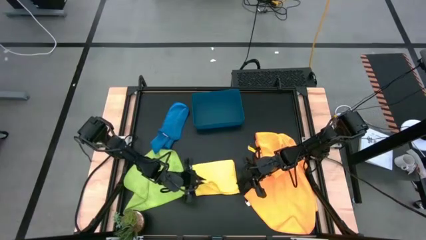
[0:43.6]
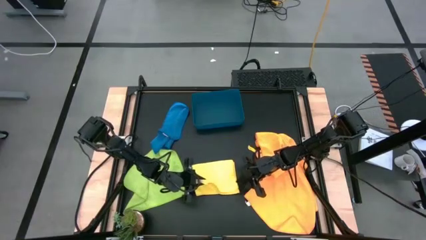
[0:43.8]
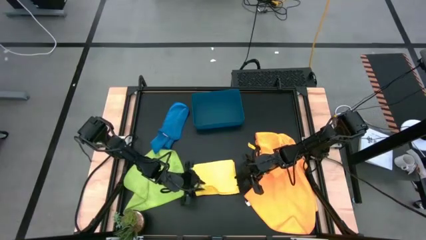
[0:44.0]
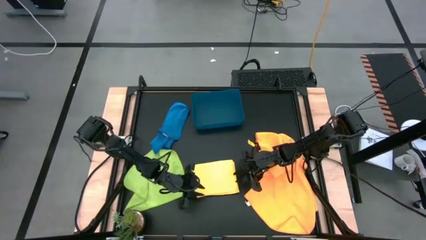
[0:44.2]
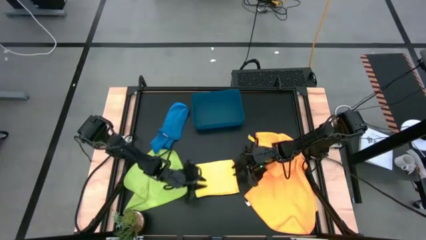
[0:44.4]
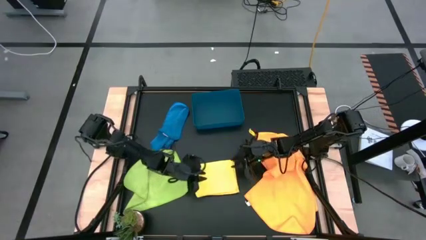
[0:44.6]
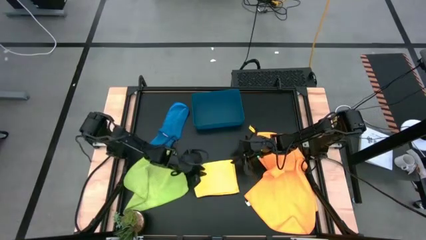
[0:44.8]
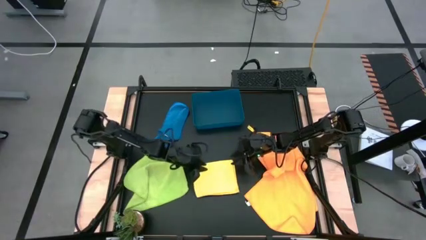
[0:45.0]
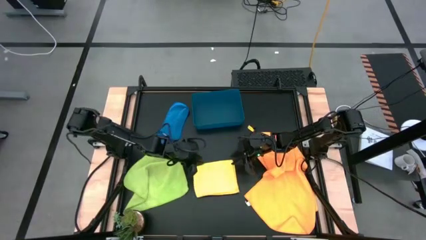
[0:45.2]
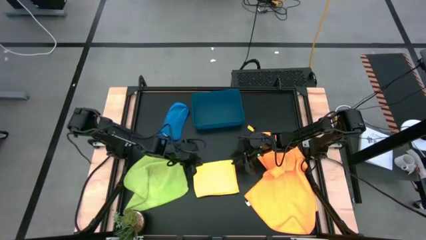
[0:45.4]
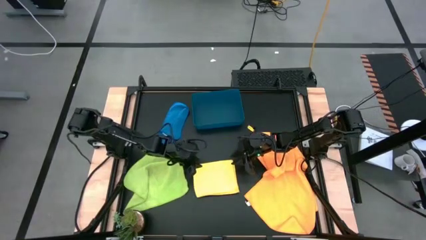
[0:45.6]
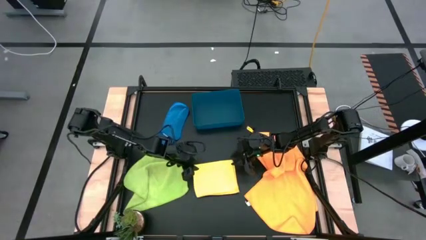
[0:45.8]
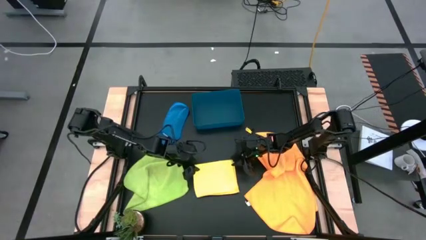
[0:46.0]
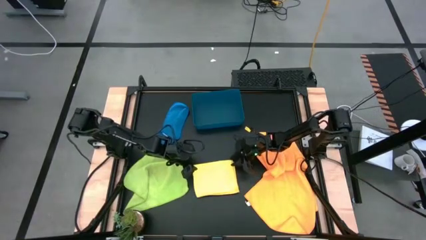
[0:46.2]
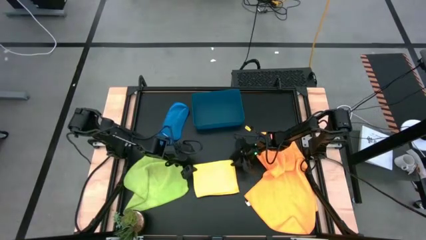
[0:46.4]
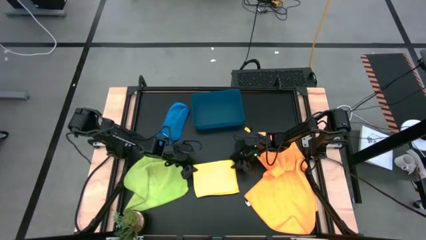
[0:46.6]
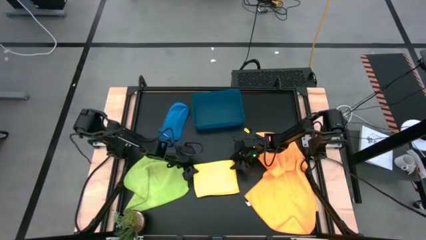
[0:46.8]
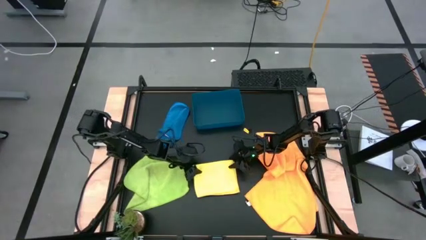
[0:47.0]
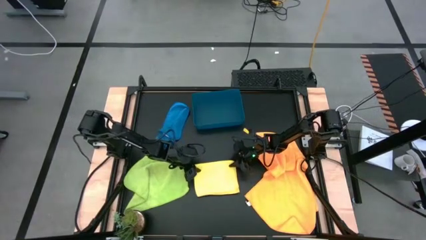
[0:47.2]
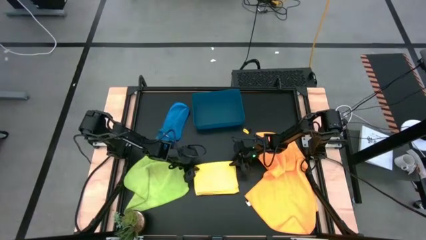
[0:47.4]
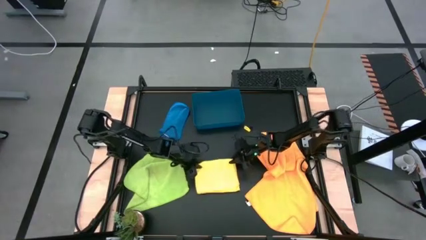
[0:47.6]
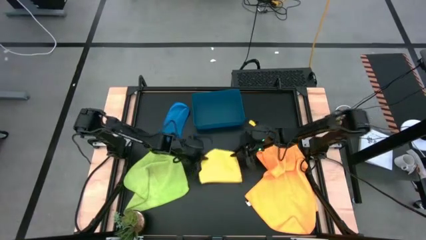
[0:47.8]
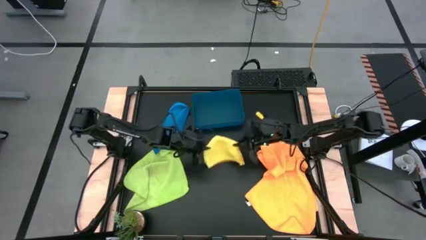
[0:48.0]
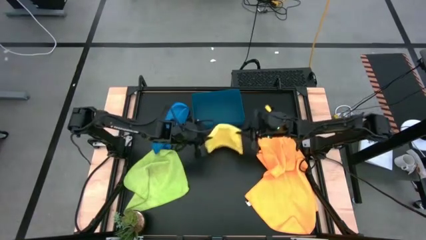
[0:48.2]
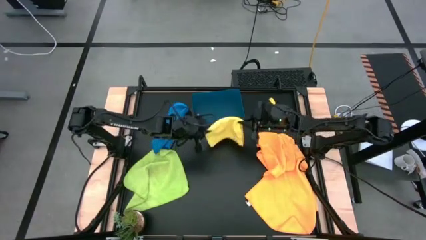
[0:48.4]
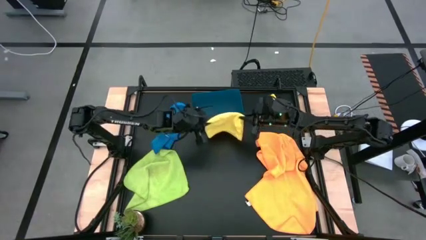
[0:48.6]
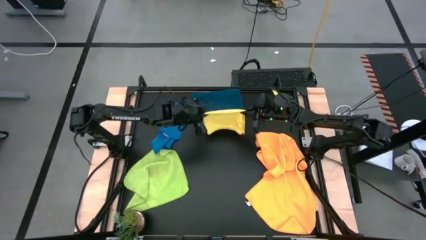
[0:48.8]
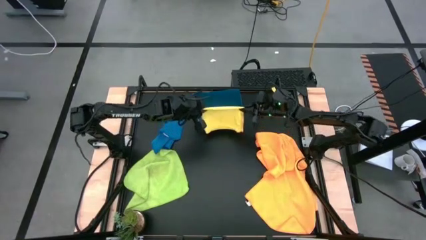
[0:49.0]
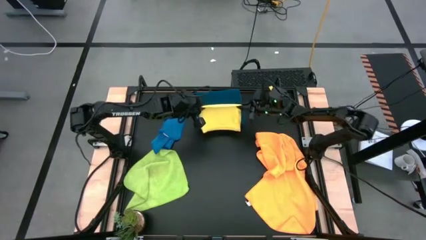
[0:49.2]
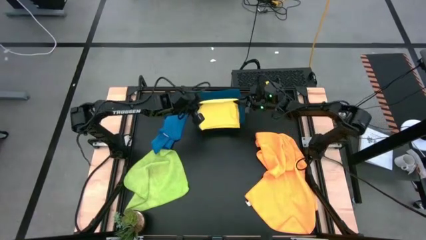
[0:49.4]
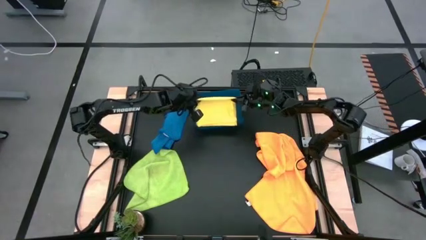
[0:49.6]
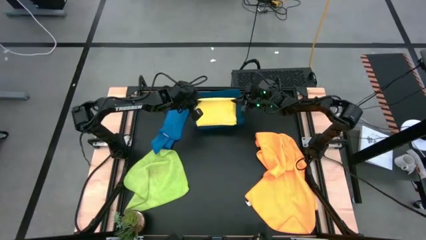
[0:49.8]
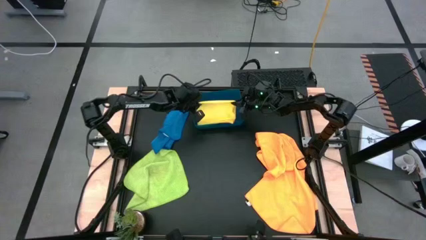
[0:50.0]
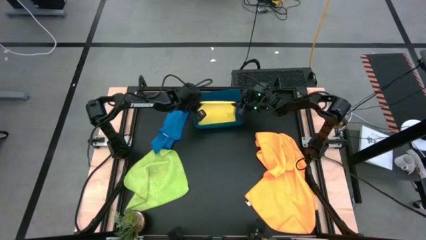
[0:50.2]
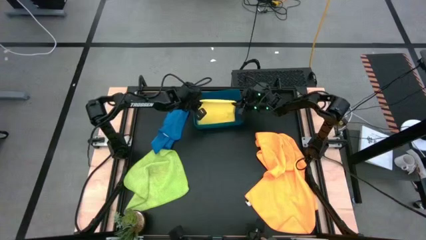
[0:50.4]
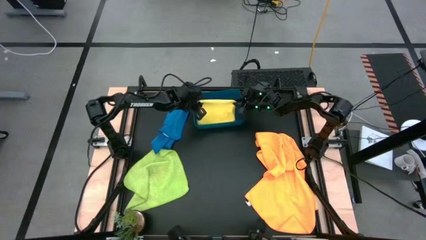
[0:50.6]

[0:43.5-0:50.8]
Task: Fold microfiber towels
Put the folded yellow microfiber cloth into the blue bin
